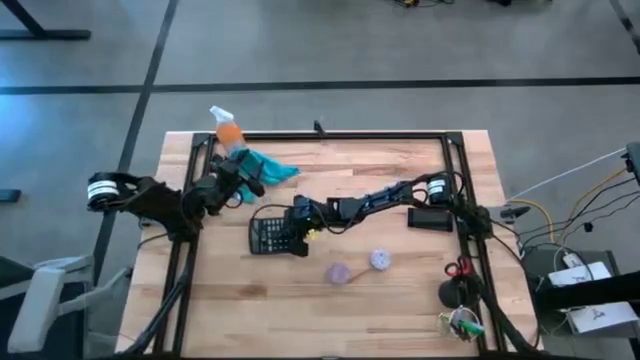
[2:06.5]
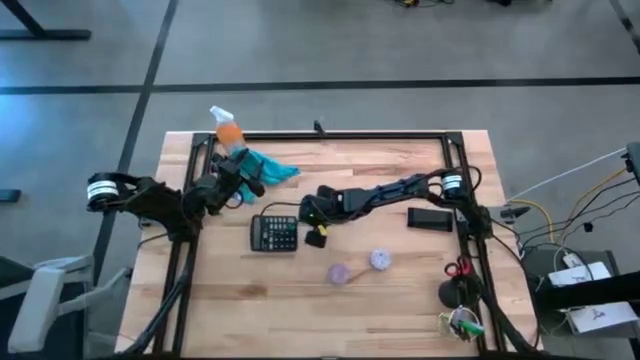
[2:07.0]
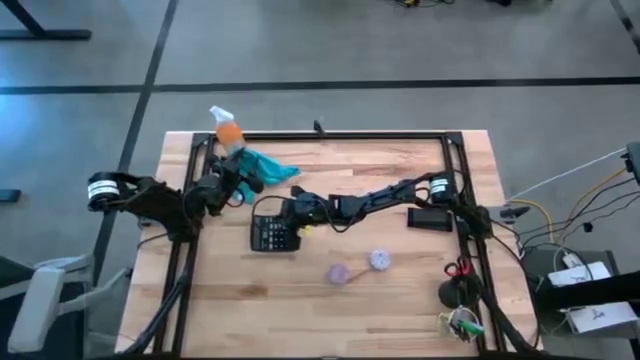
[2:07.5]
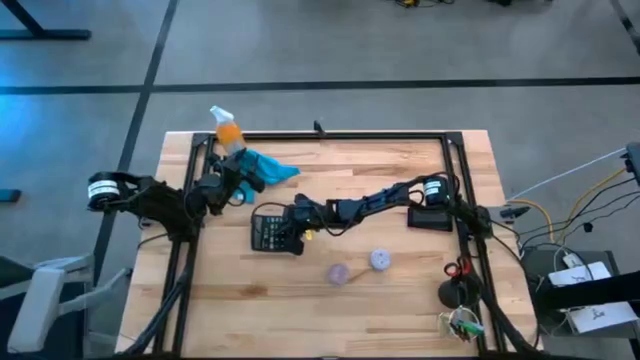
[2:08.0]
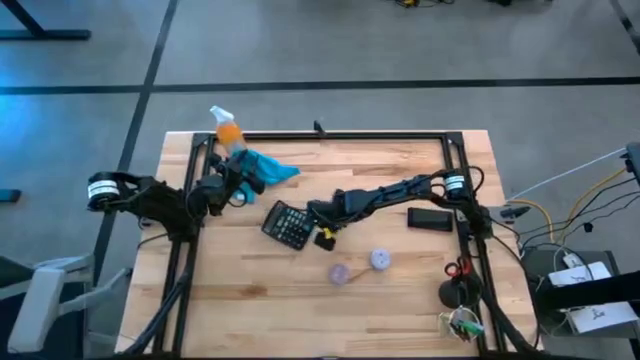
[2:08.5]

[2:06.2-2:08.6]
Task: Apply microfiber cloth
Move the black calculator to the center of the table

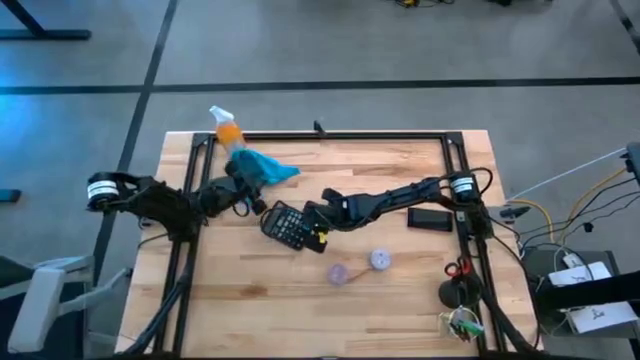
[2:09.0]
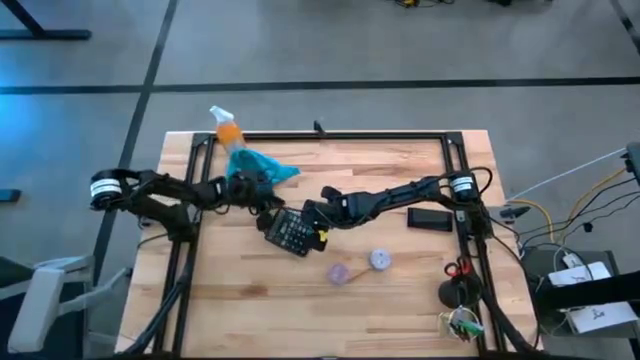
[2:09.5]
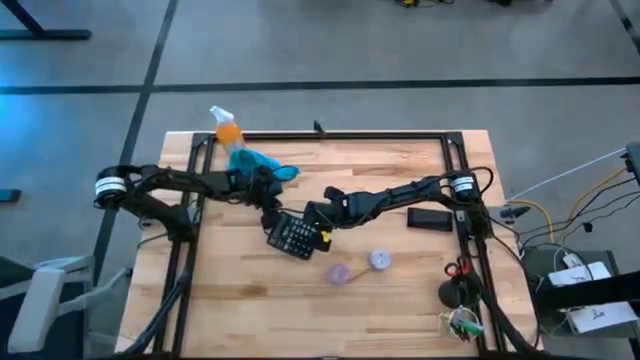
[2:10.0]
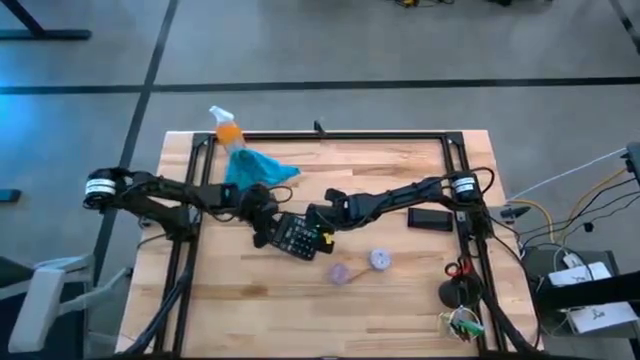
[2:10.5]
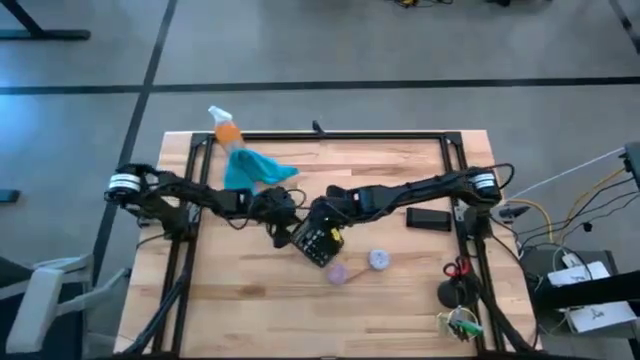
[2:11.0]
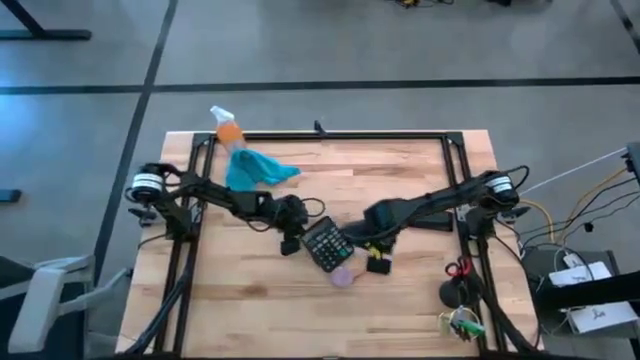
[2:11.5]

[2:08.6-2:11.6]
Move the black calculator to the center of the table

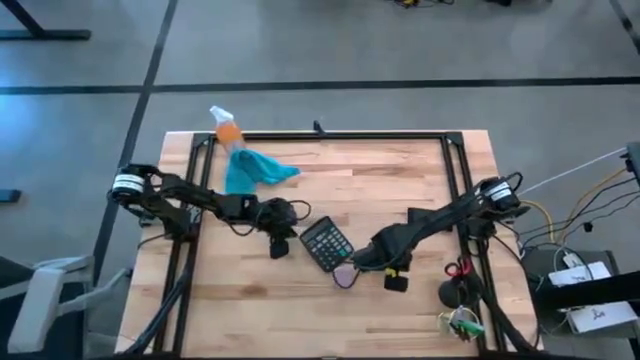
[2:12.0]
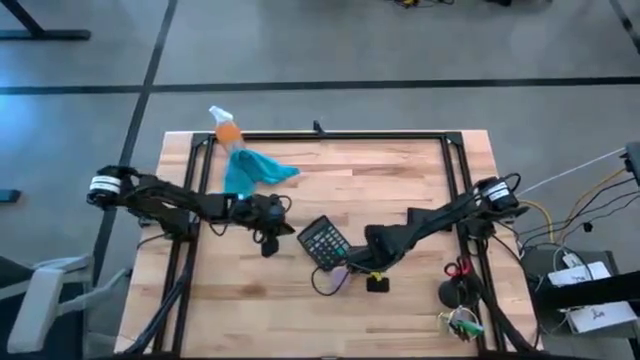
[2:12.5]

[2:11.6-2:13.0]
Adjust the white scented candle

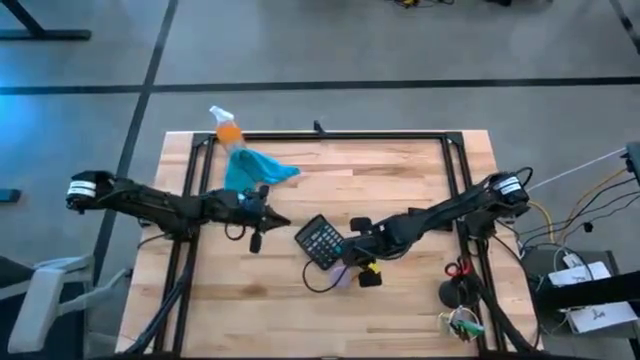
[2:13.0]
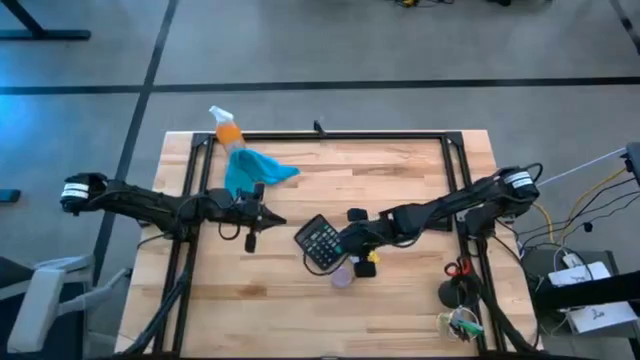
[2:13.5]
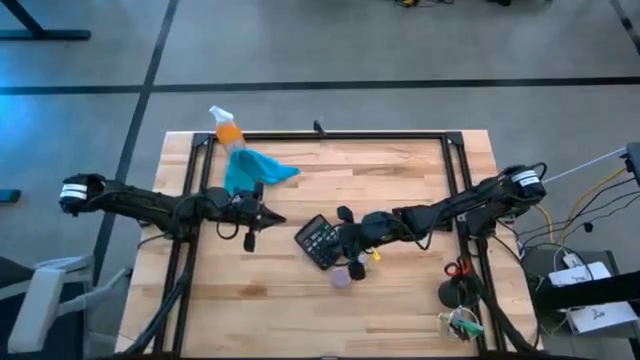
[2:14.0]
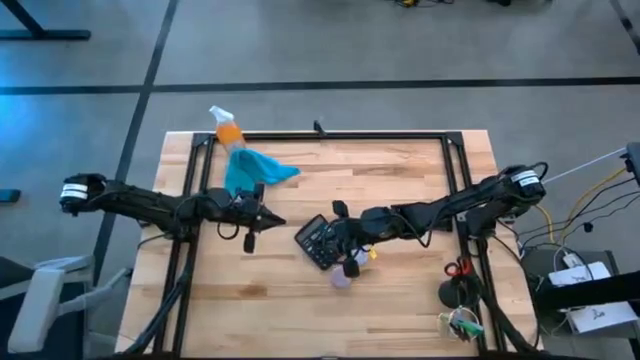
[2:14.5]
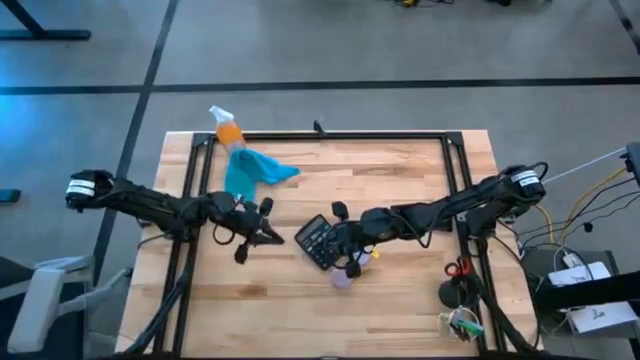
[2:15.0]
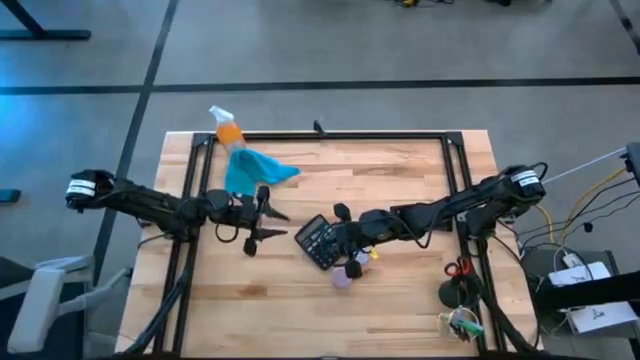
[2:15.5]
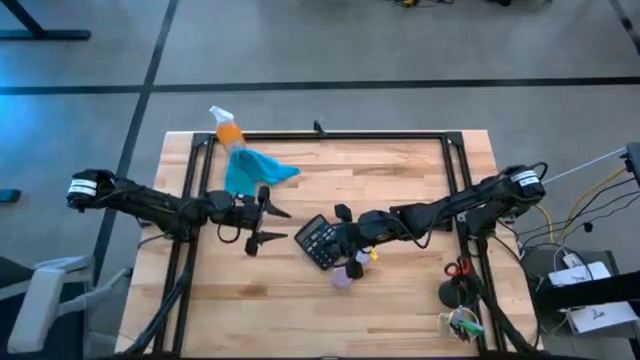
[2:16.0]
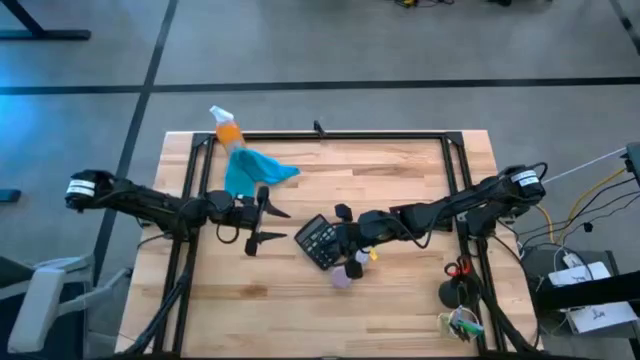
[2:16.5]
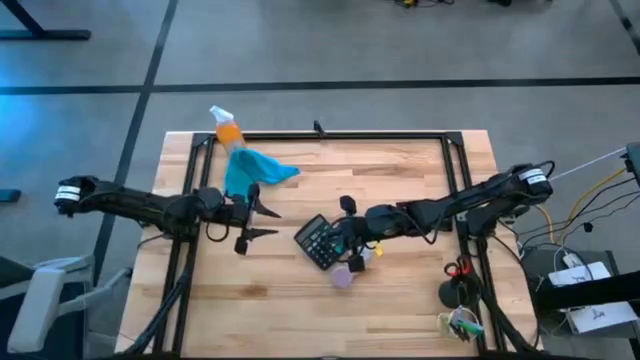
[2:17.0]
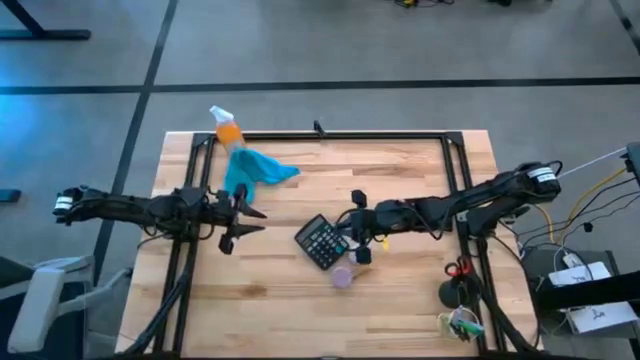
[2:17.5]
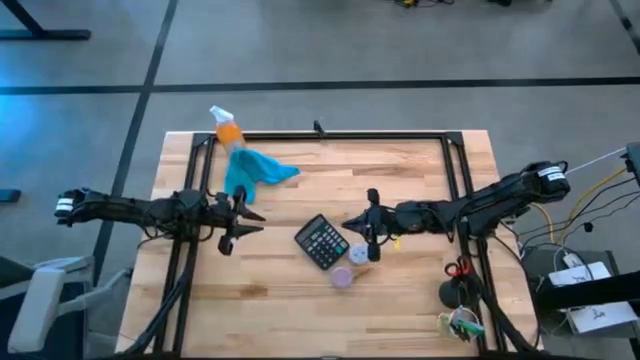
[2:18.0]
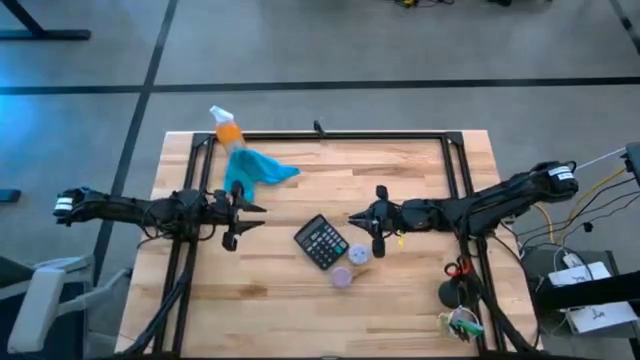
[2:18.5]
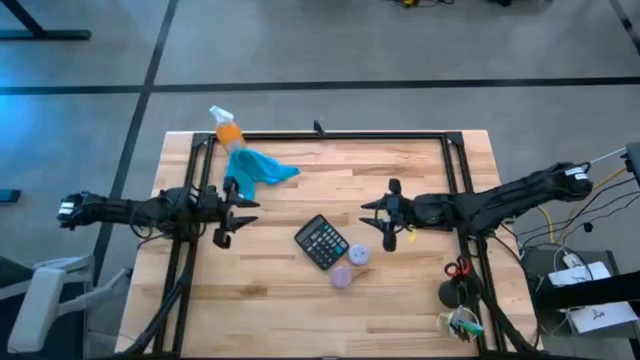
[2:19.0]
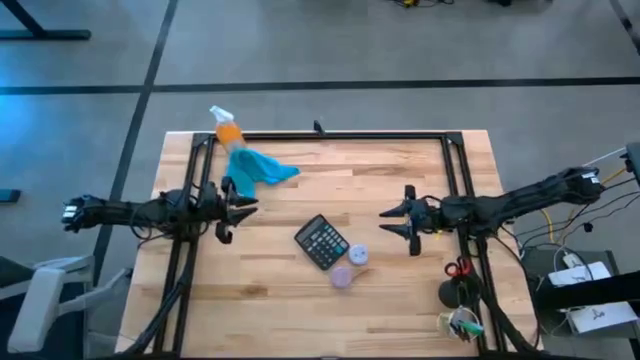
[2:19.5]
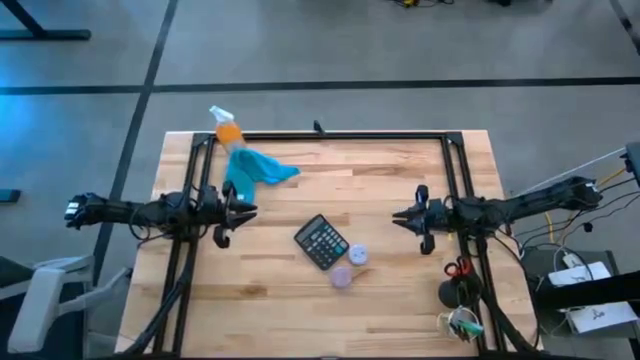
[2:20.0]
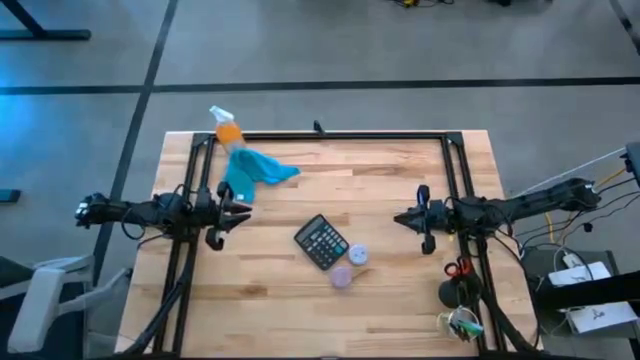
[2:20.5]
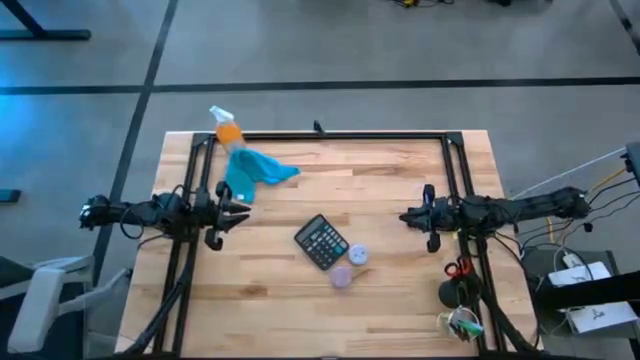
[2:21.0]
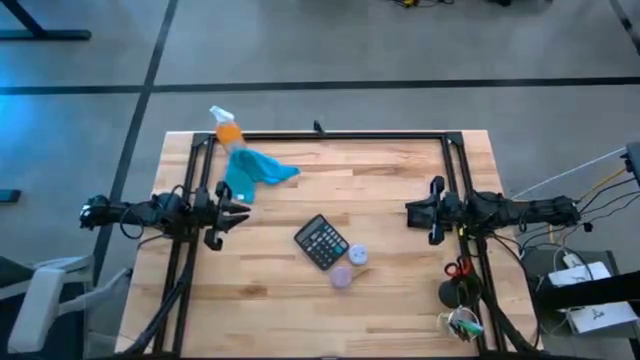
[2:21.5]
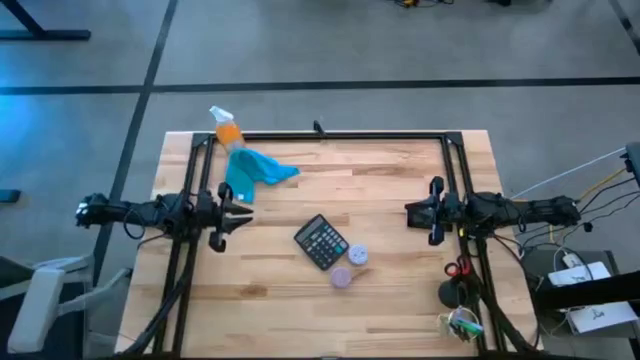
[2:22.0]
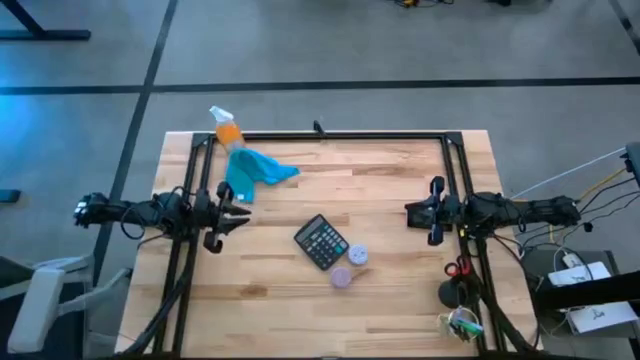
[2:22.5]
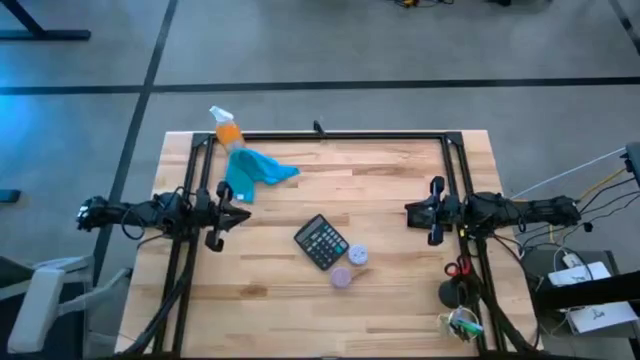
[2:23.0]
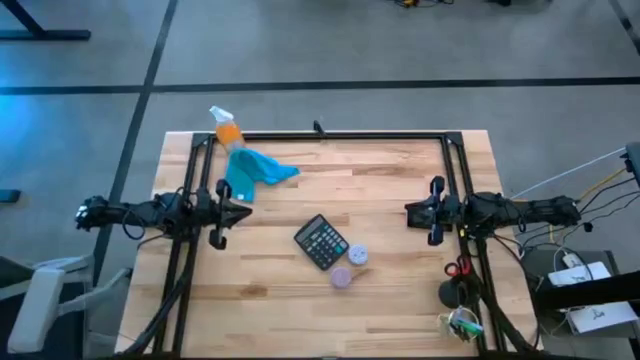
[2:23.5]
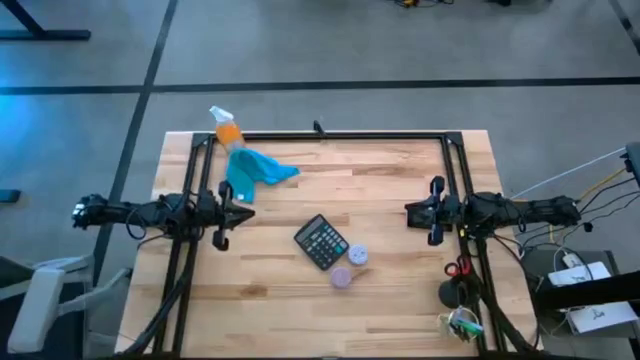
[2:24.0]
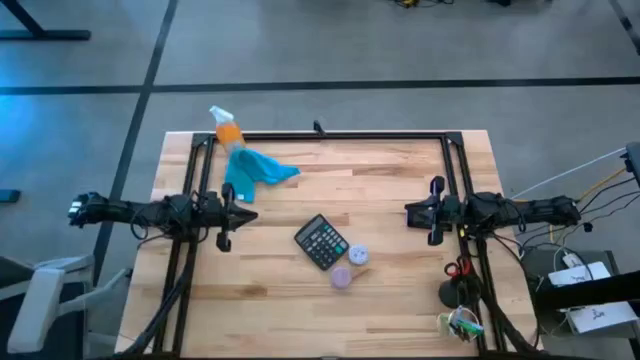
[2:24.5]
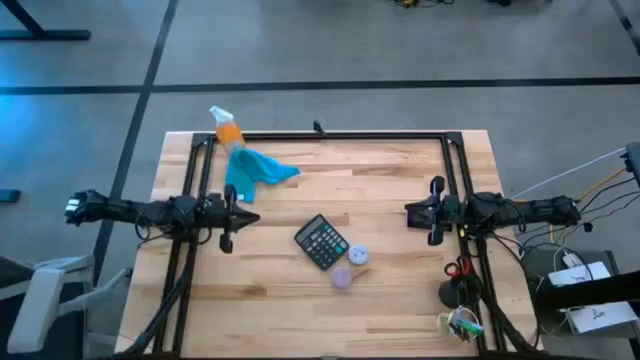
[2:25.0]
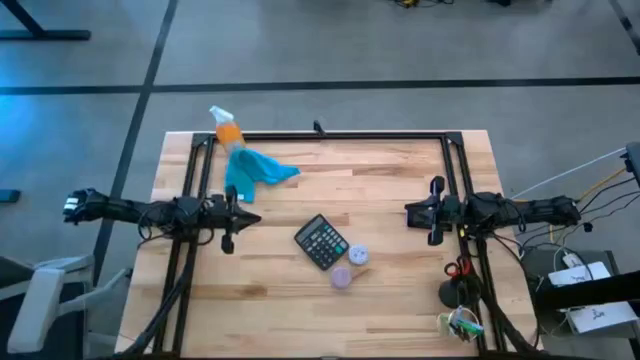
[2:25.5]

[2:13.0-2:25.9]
Return to Home Position

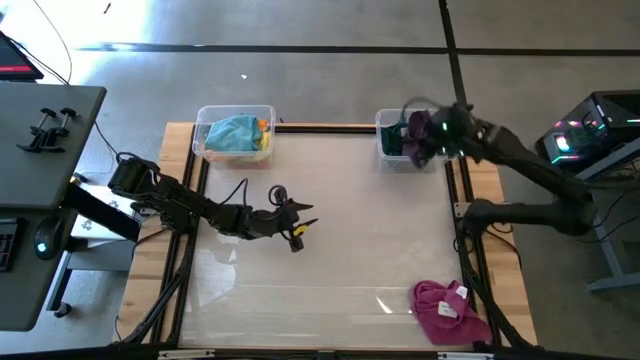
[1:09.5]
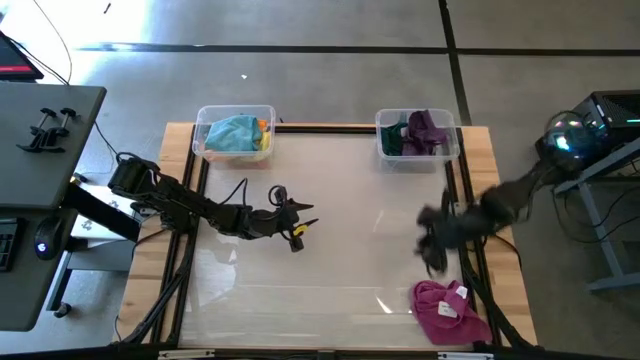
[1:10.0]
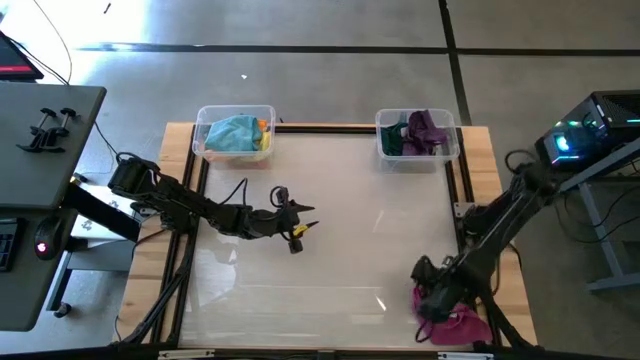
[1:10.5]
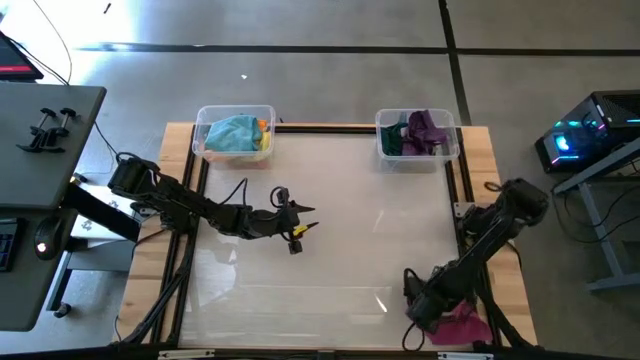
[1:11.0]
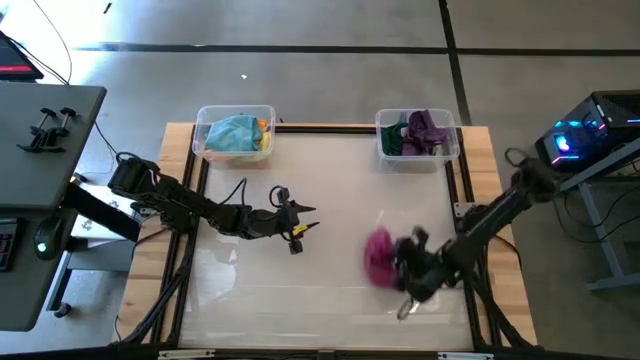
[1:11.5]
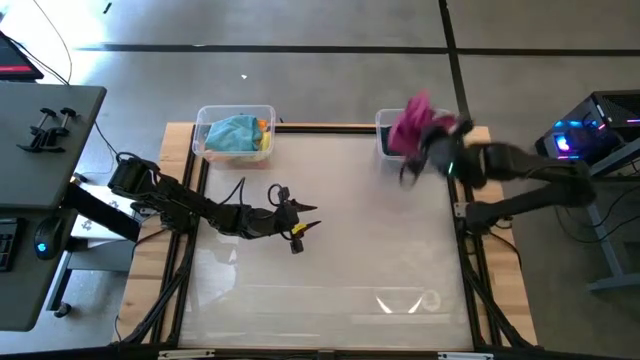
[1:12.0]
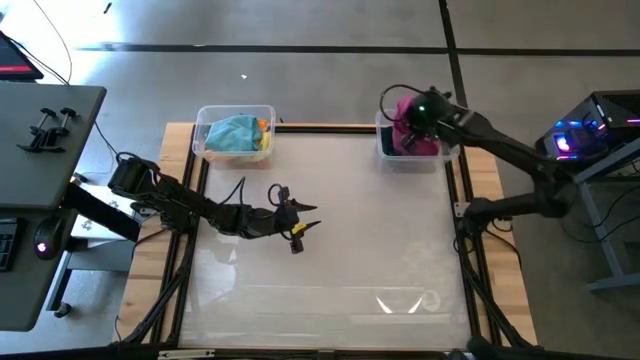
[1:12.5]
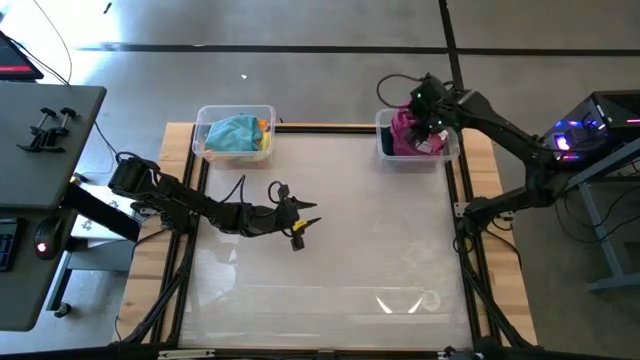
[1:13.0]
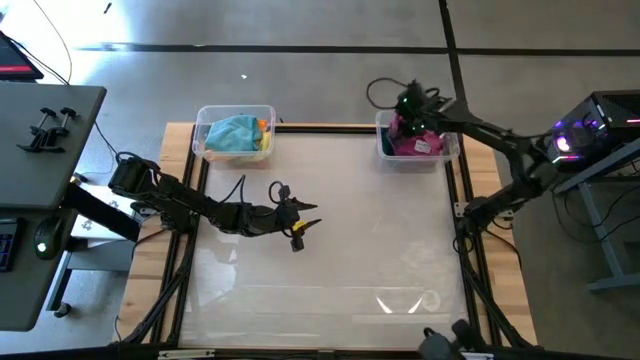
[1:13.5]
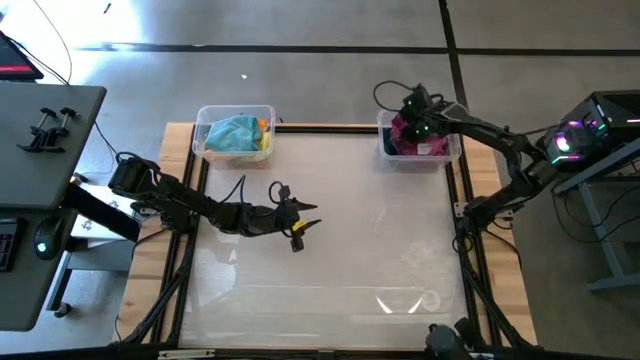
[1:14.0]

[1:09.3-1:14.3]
Task: Sort towels by color in basket
Put the dark pink microfiber cloth into the right transparent bin
